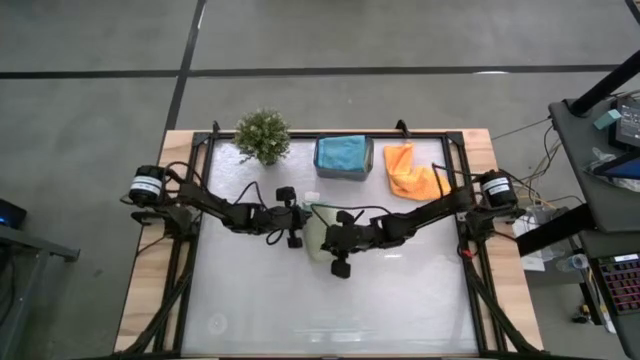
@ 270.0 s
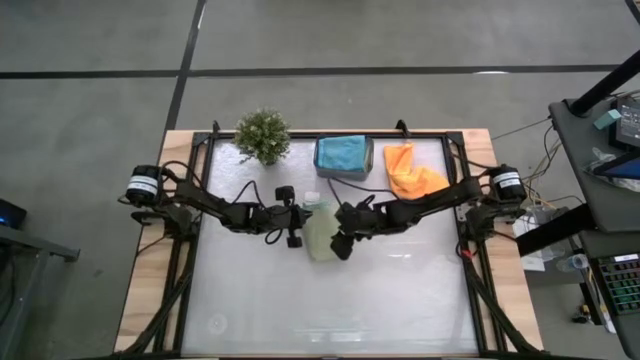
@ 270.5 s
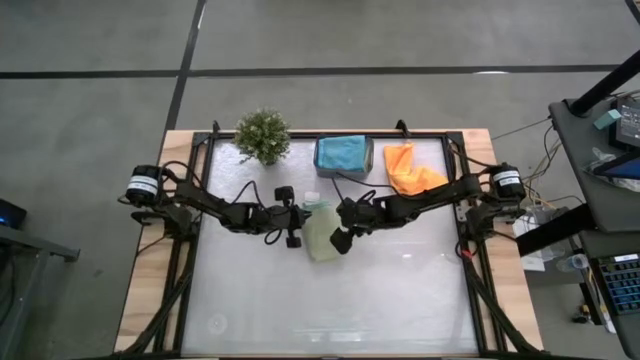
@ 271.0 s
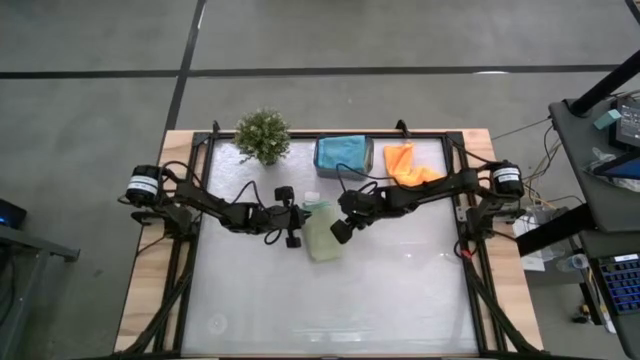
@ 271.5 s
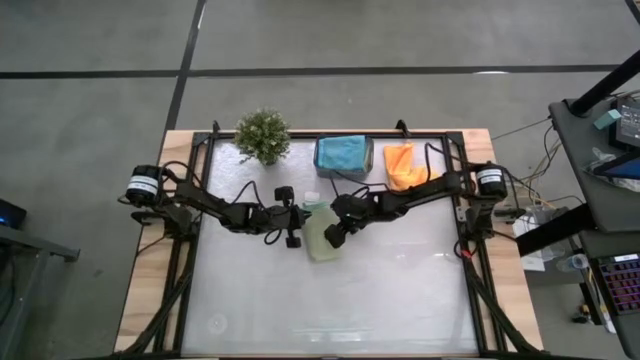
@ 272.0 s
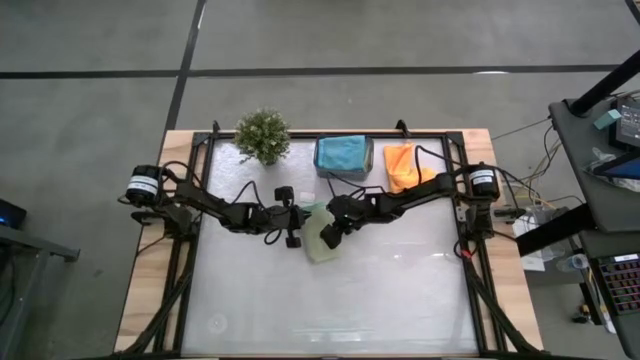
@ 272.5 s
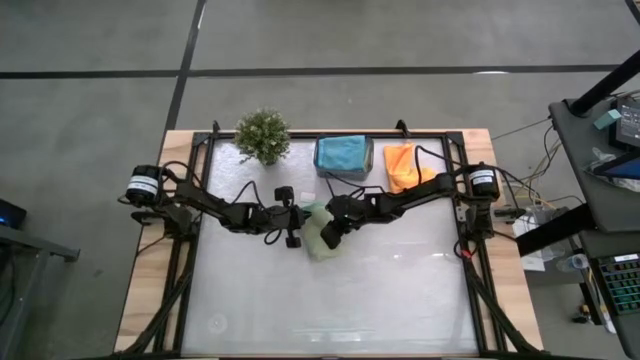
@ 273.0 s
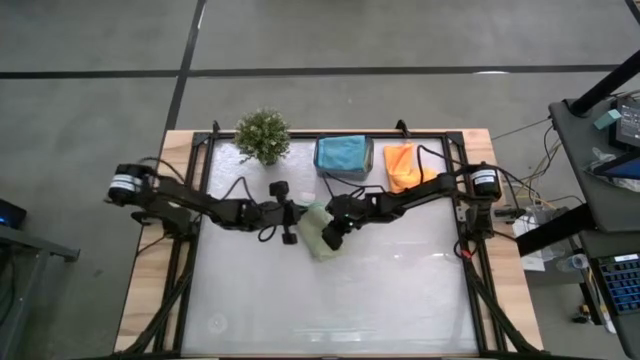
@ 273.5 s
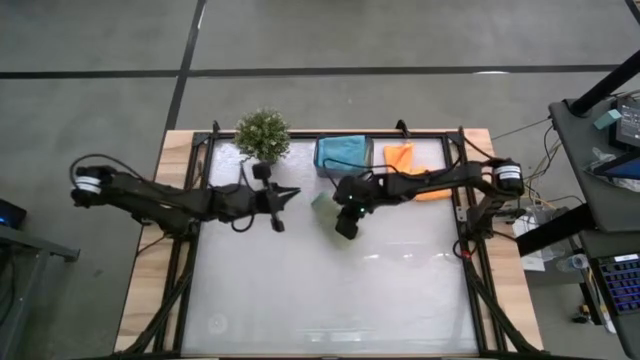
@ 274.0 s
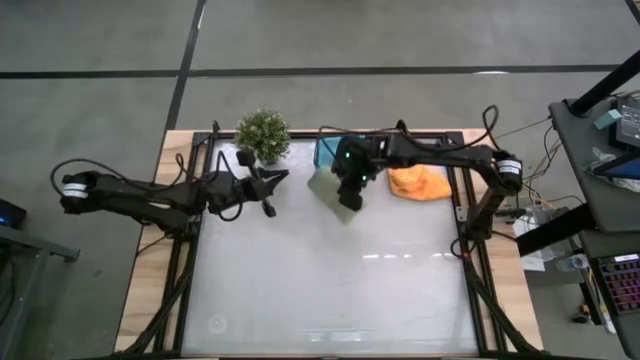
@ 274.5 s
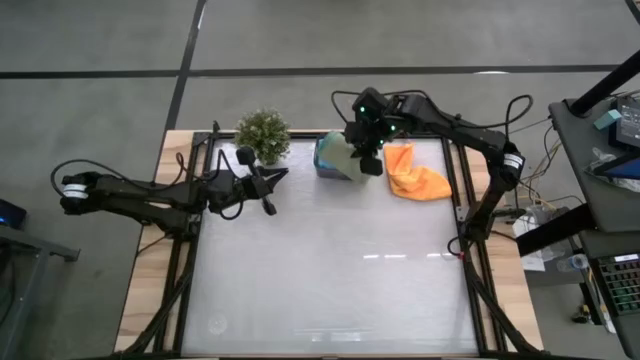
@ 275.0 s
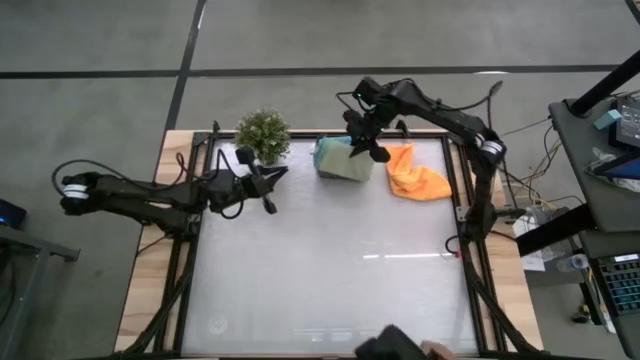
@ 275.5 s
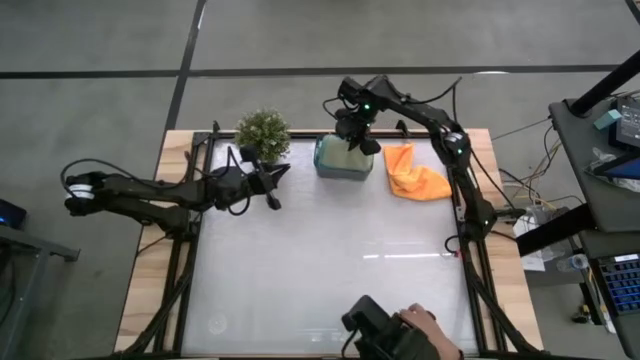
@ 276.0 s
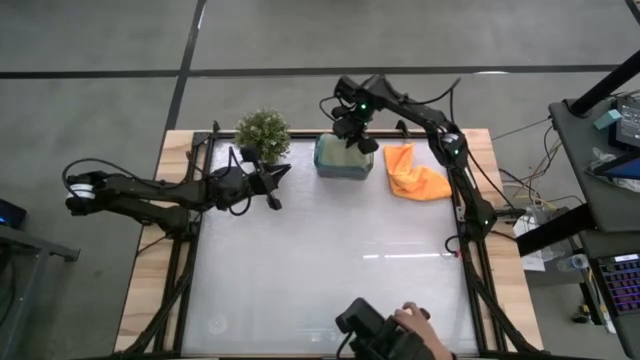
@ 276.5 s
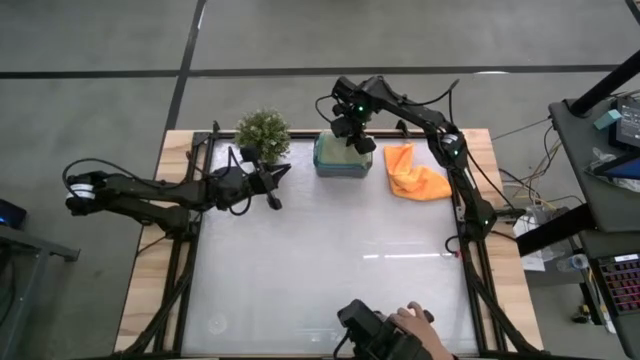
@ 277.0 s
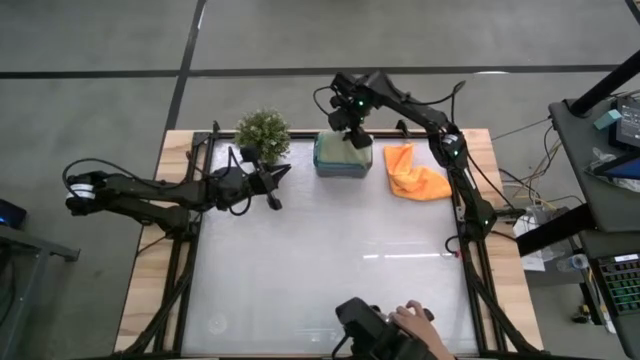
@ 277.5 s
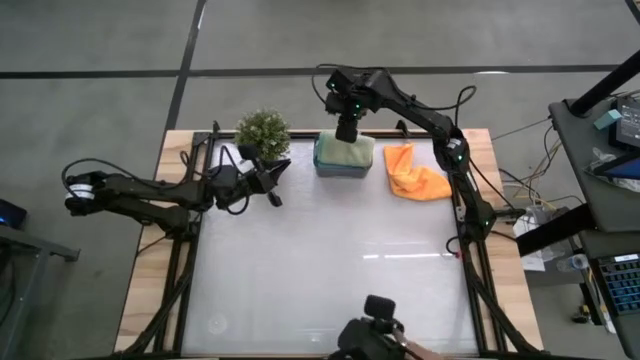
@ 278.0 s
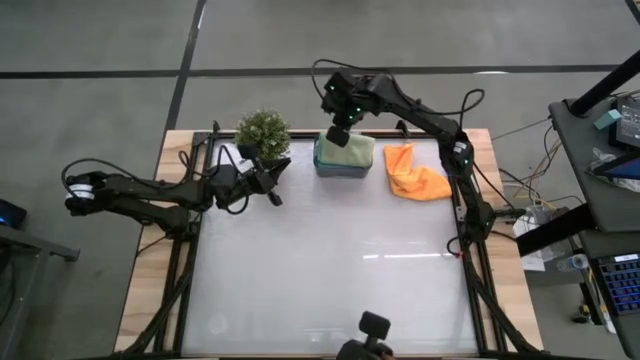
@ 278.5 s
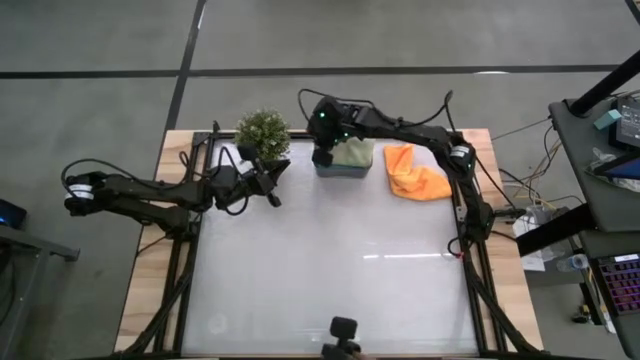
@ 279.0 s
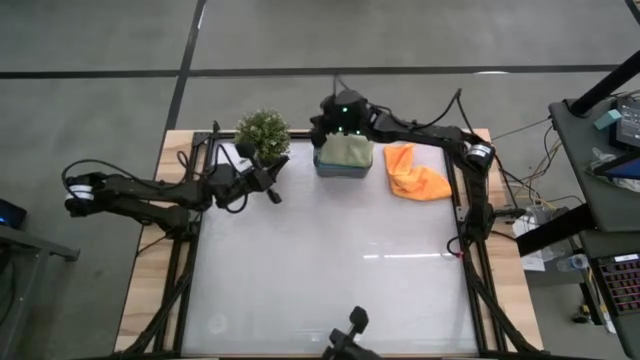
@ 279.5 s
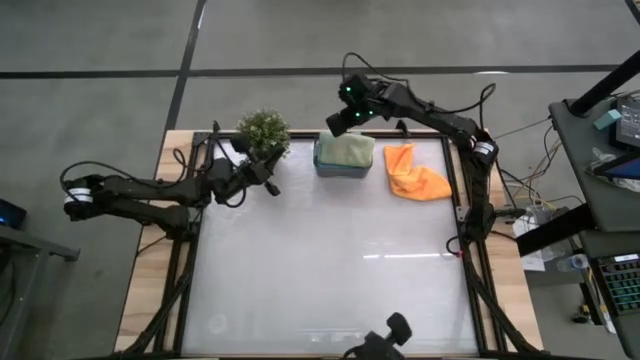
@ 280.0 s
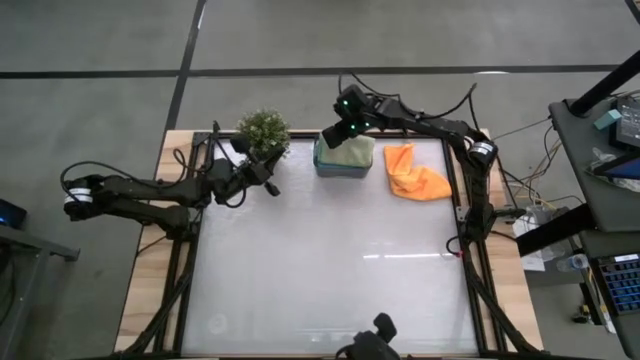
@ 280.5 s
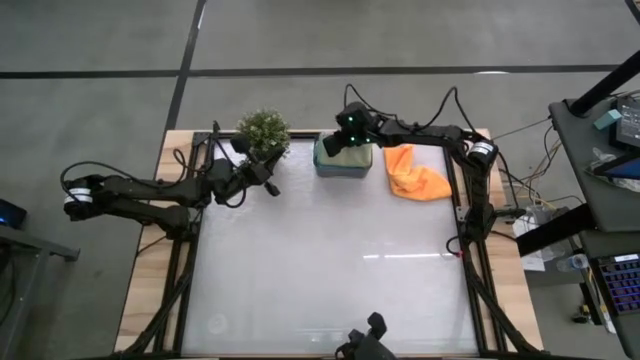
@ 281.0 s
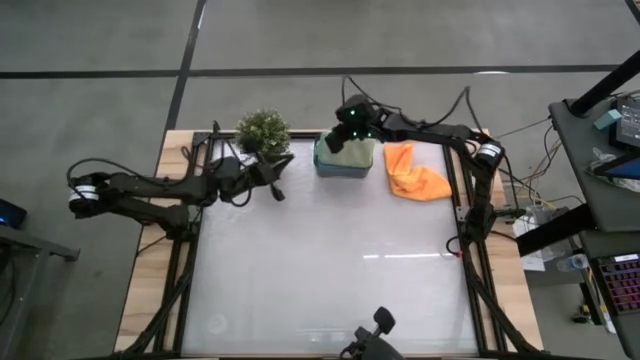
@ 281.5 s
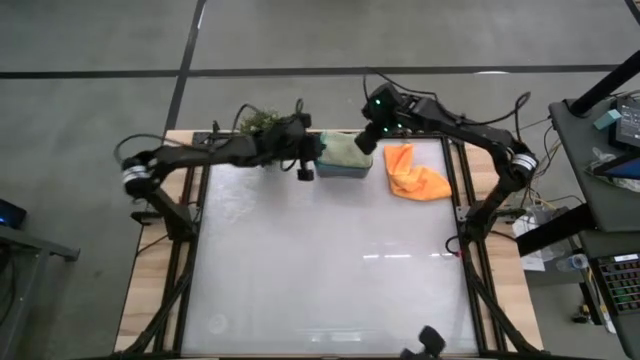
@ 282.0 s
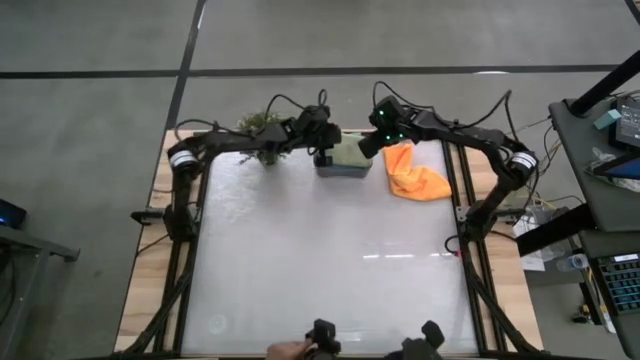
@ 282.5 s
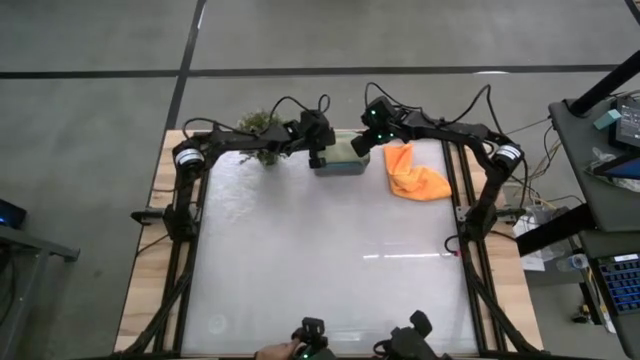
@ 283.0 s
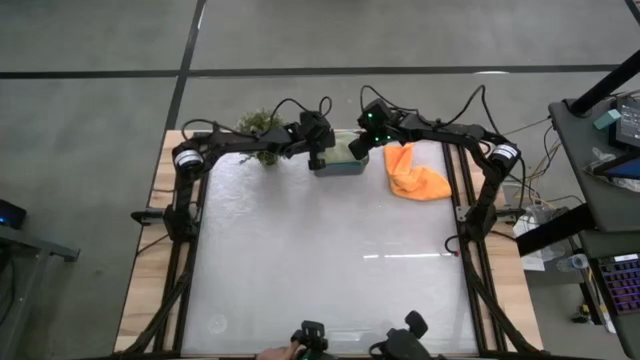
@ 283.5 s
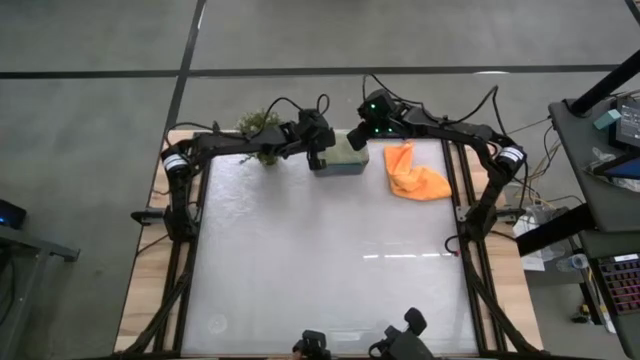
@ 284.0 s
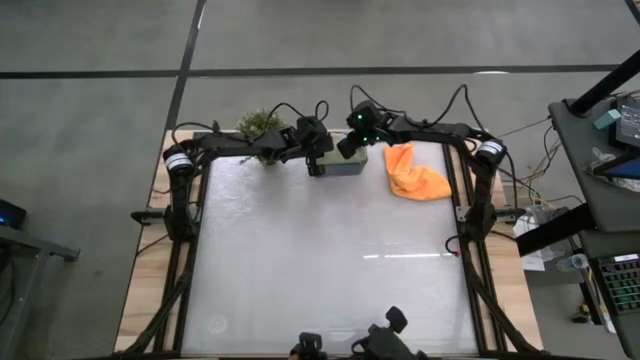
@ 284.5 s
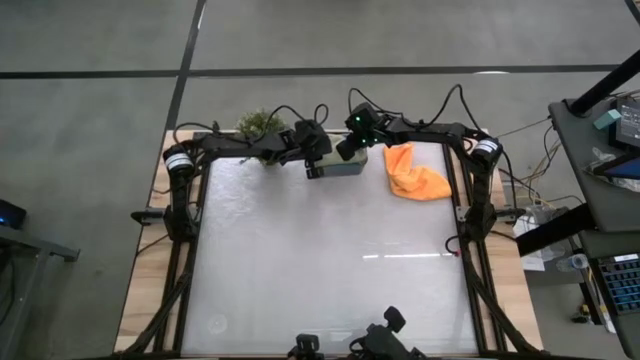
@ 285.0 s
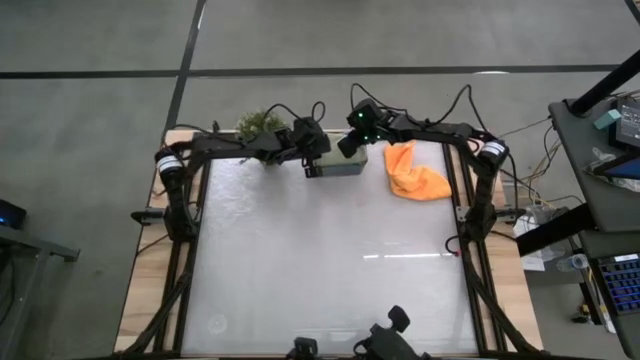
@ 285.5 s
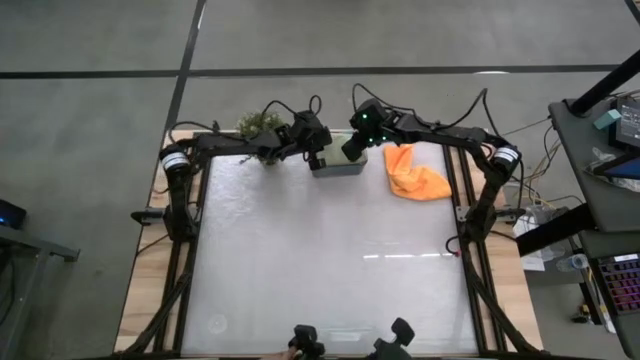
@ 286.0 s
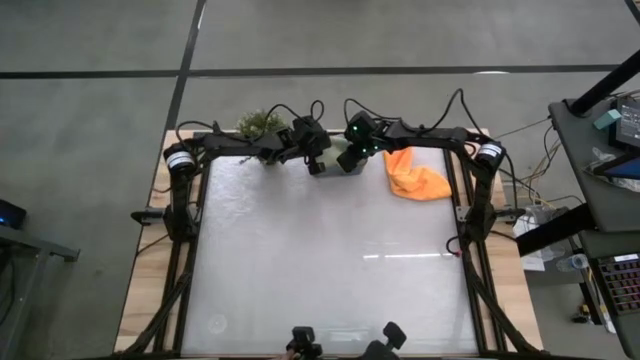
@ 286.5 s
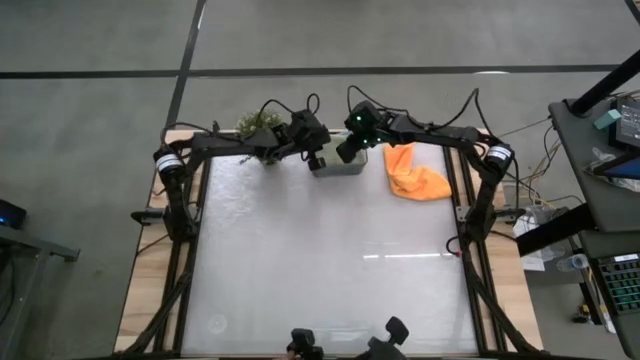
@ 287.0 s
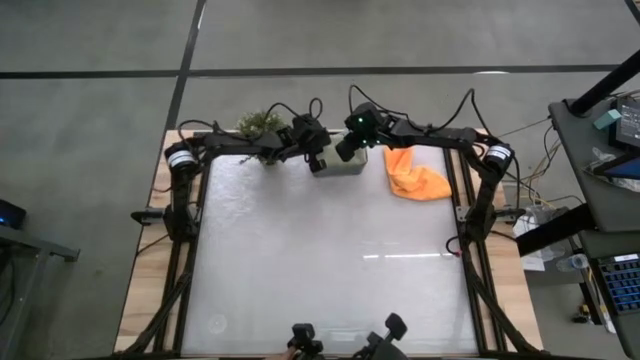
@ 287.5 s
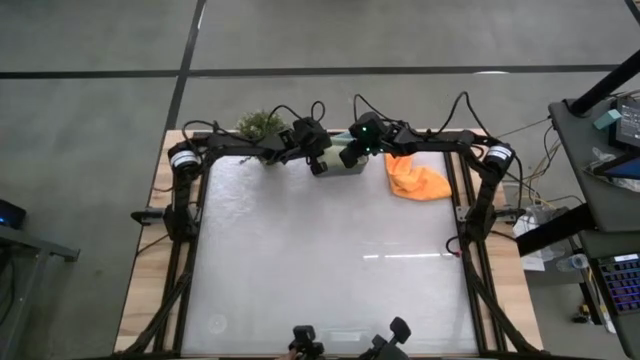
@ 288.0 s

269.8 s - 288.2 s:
Task: Fold microfiber towels
Stack the folded green towel on top of the folded blue towel into the black bin

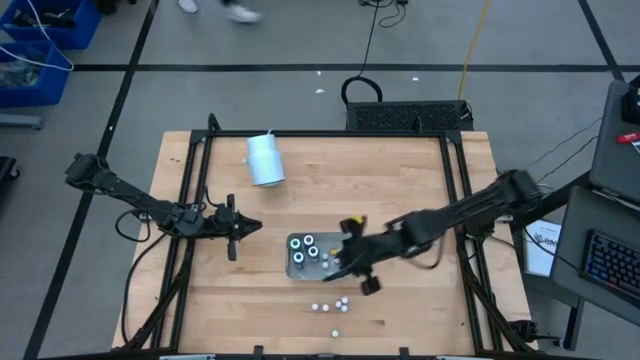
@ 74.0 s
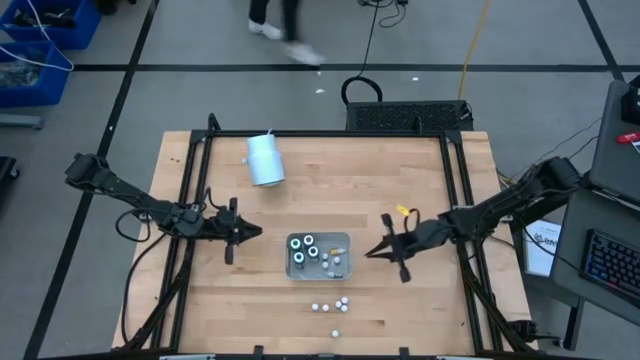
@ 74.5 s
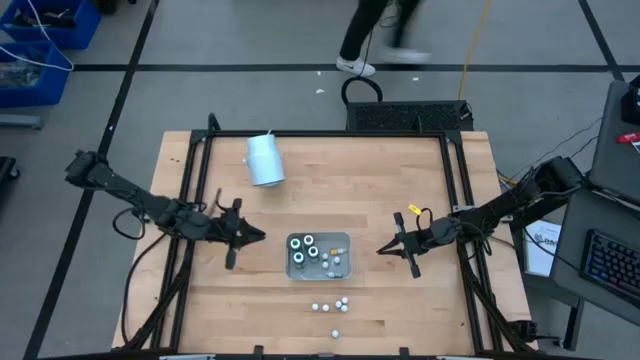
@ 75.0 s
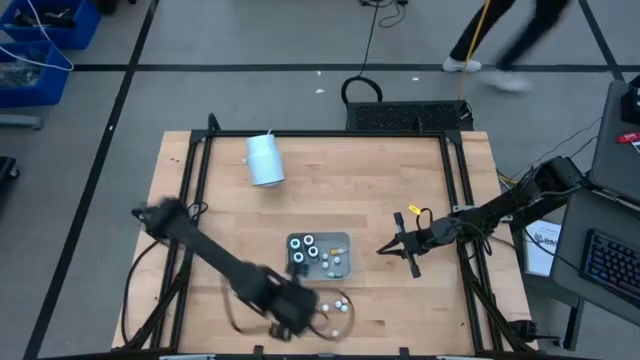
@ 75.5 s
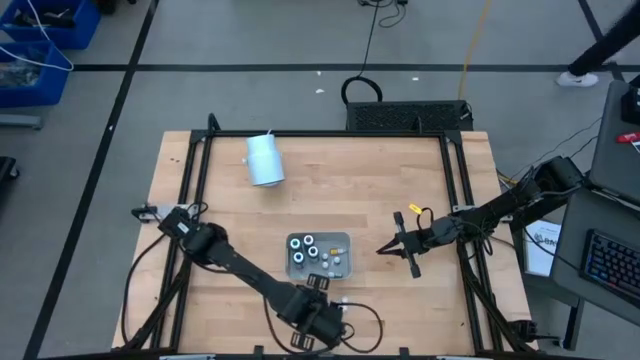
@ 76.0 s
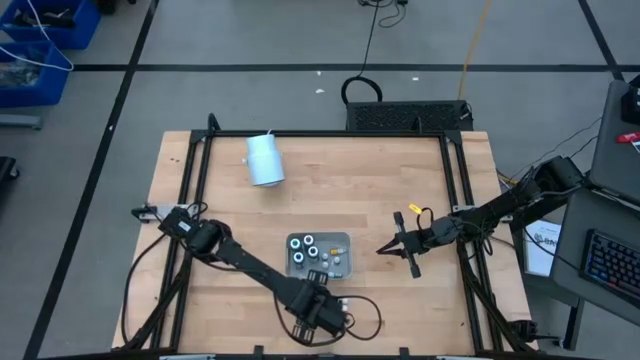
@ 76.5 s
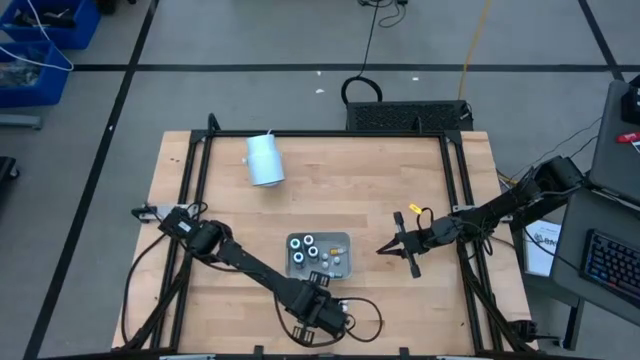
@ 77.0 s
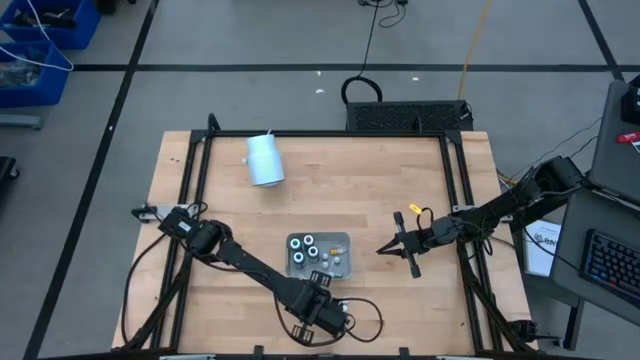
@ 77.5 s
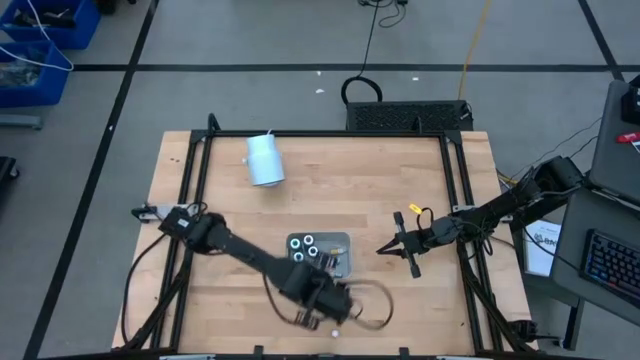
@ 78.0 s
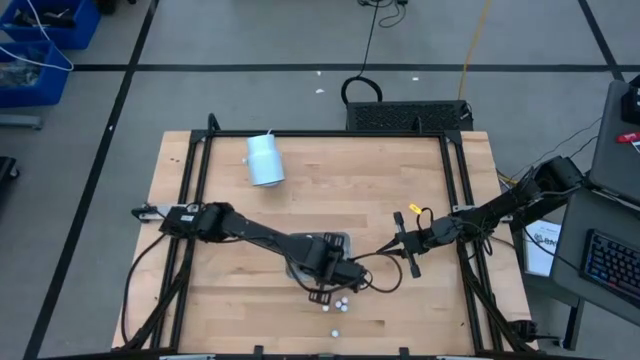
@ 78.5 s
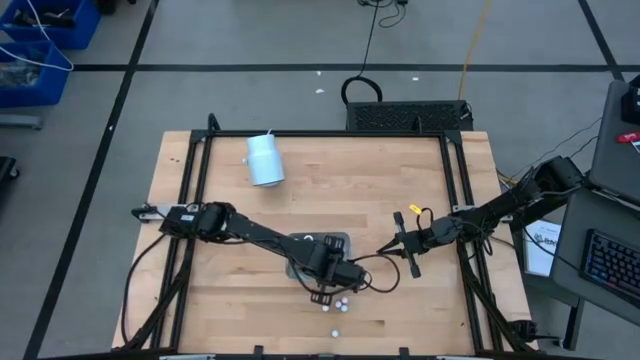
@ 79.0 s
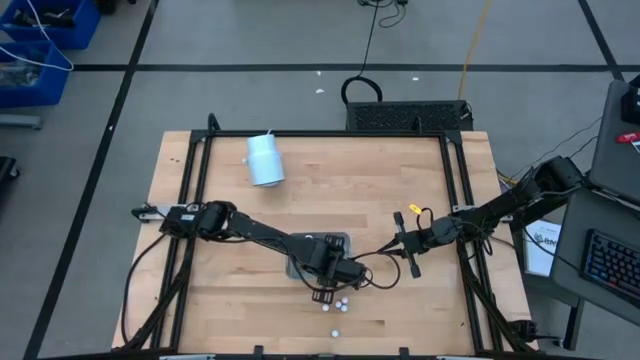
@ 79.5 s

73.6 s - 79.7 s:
Task: Pick & Place food coloring
Put the small red food coloring bottle into the gray bin
